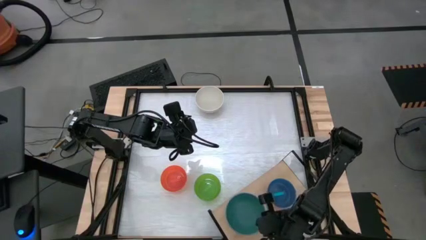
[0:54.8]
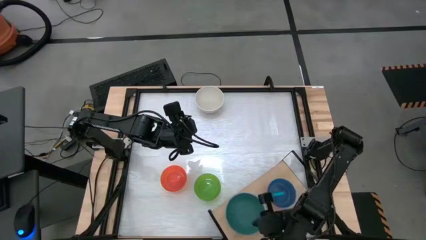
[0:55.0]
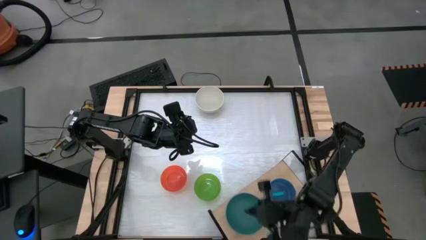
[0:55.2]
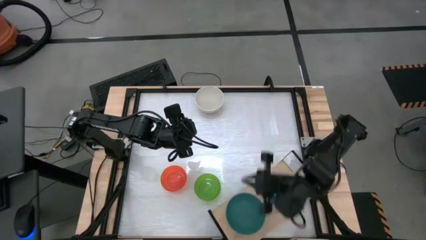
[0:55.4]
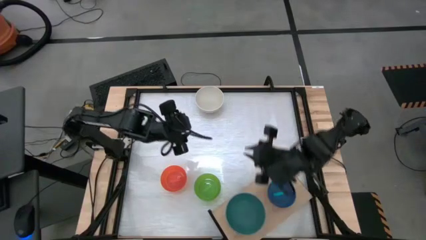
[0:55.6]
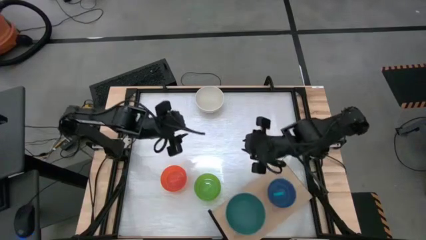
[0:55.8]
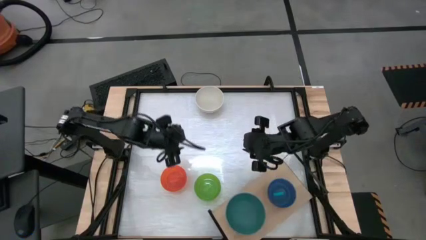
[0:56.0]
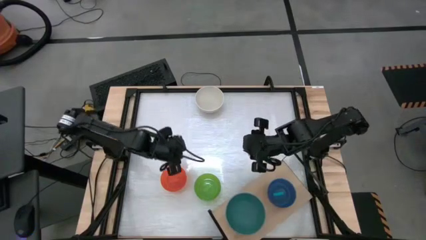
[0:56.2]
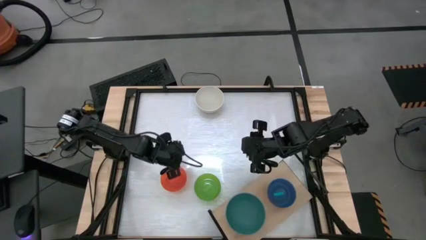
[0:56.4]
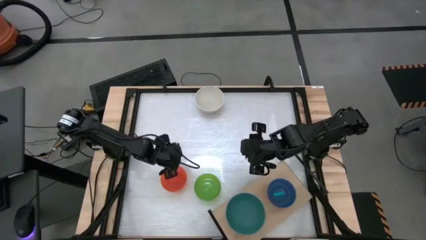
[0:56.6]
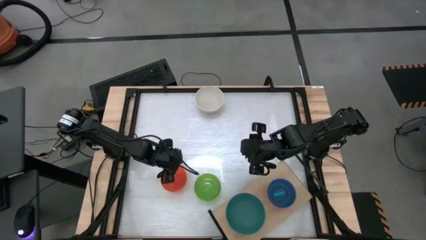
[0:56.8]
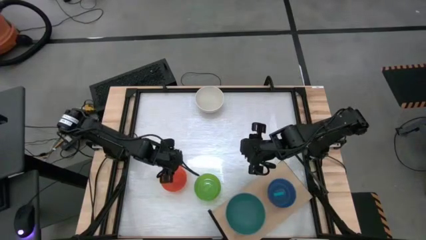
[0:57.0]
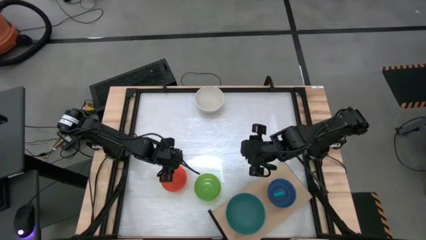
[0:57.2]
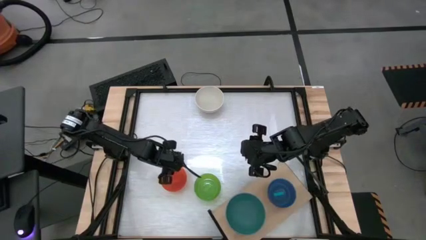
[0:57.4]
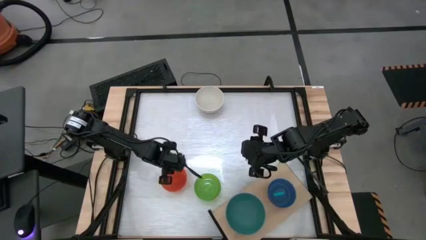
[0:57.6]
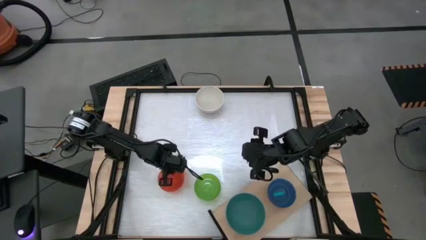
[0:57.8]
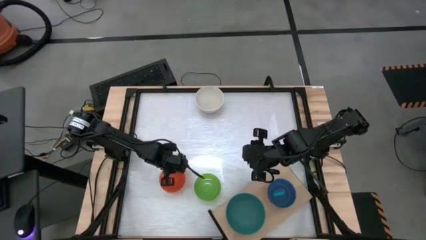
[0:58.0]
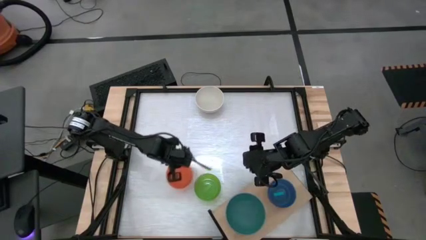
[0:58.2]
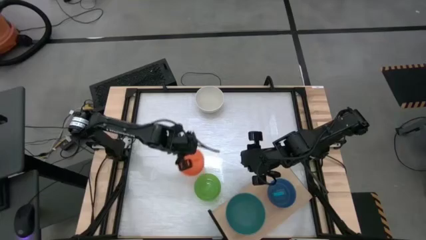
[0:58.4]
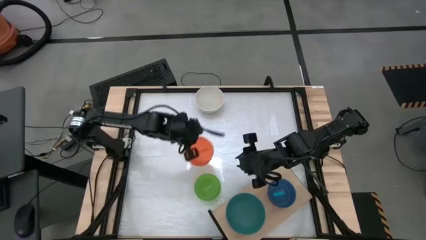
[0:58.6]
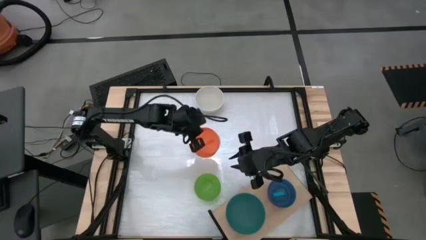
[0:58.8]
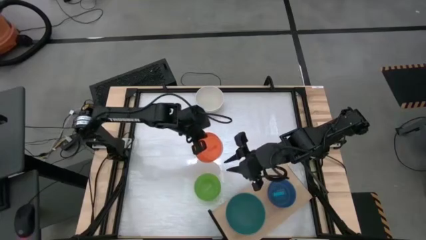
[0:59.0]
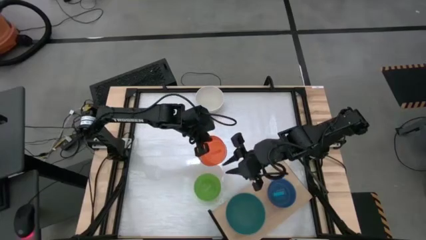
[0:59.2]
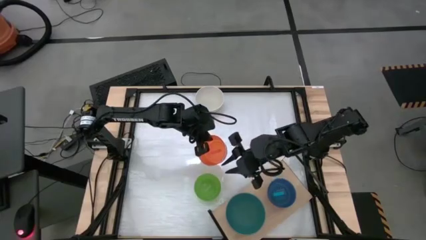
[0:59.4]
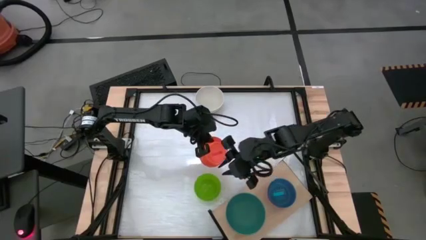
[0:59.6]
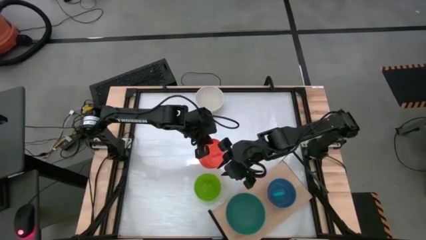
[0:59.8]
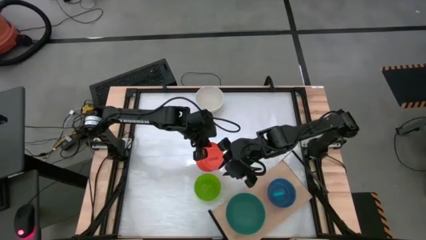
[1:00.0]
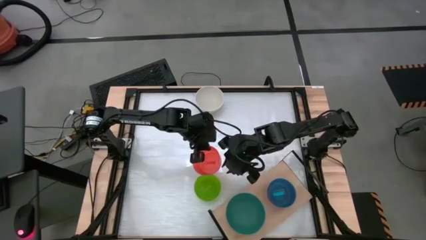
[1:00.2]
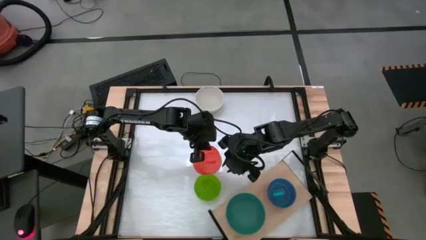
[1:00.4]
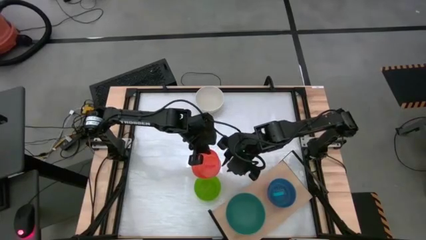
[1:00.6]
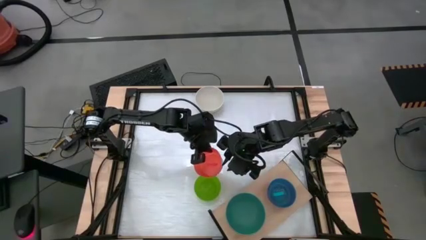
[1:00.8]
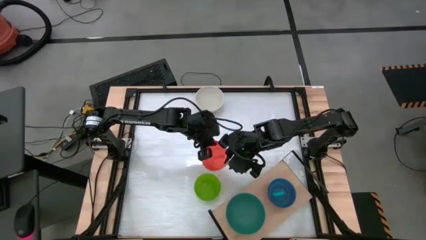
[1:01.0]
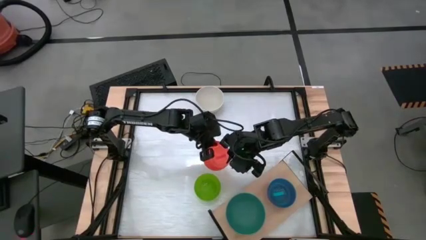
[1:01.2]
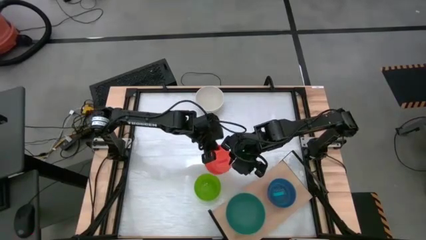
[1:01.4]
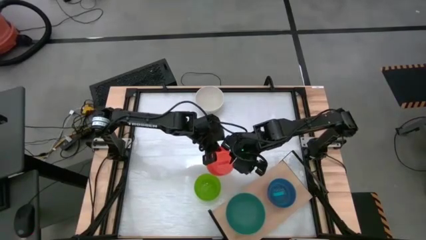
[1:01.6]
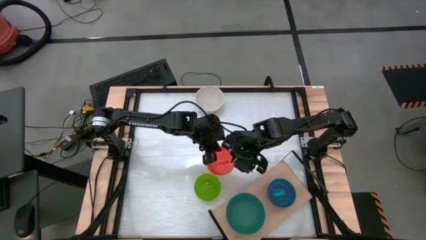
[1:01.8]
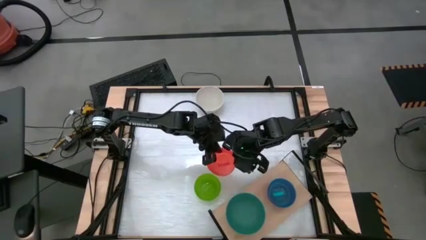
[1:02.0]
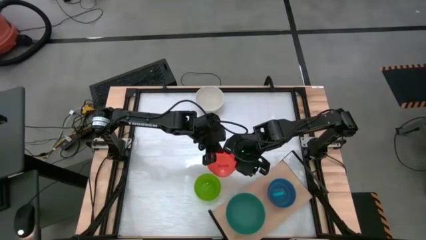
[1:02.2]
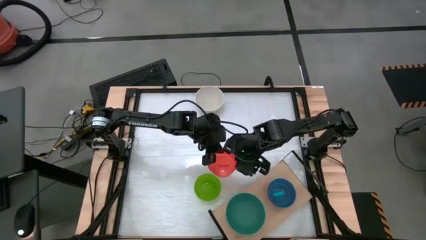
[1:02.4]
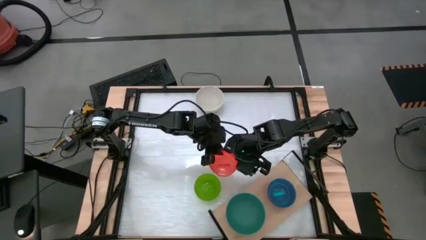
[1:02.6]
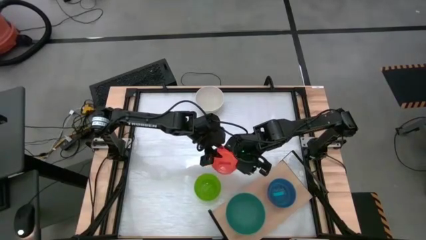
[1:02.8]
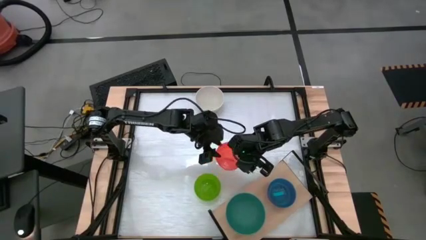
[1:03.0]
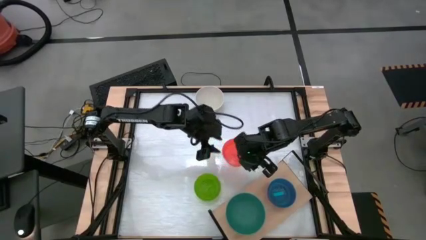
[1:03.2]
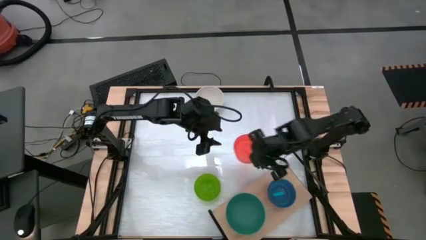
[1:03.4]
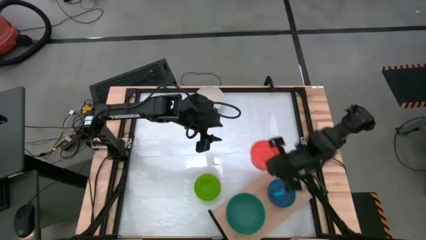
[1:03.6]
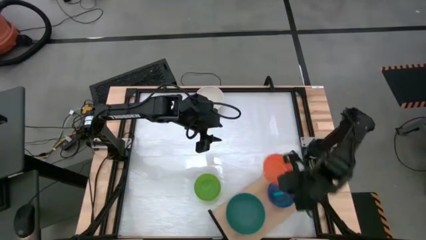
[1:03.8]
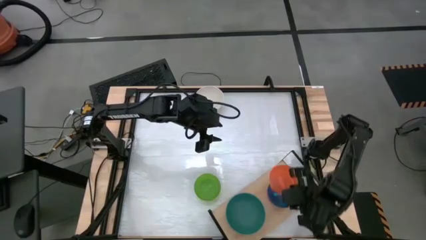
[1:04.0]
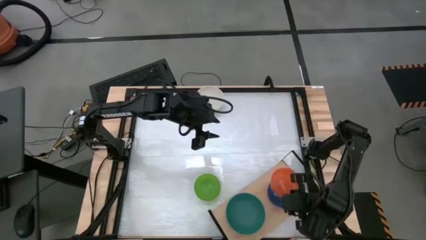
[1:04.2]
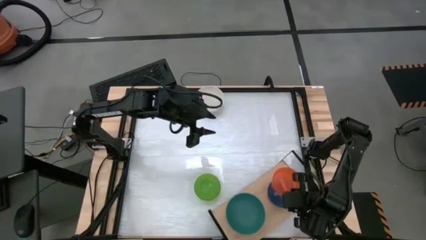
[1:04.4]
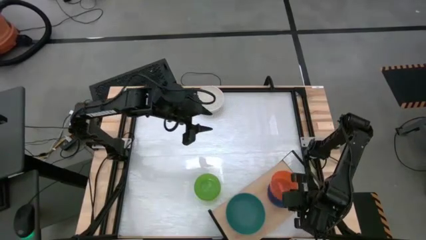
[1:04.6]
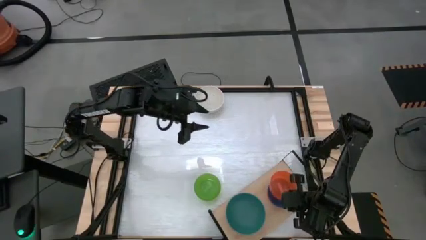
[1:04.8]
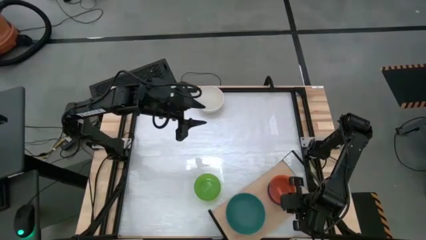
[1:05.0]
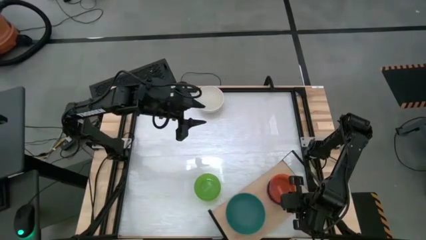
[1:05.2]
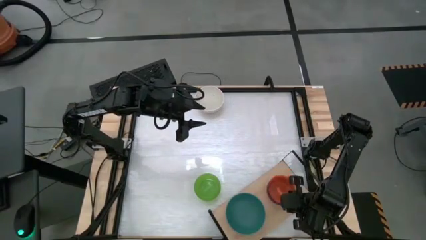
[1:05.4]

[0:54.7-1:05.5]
Task: Place and stack bowls onto a shelf
Stack the orange bowl on top of the blue bowl on the shelf

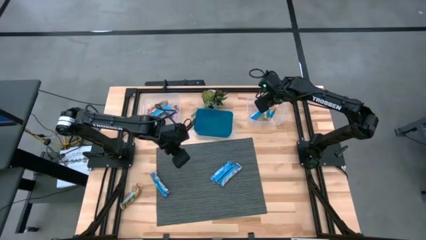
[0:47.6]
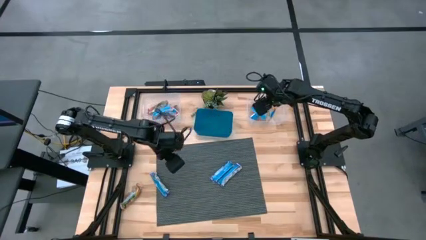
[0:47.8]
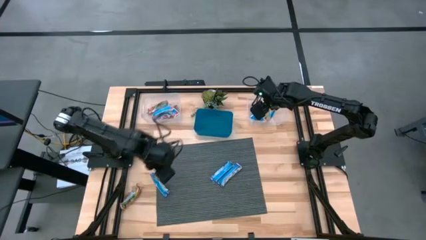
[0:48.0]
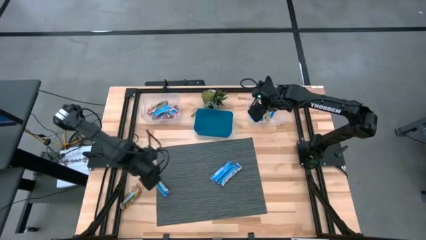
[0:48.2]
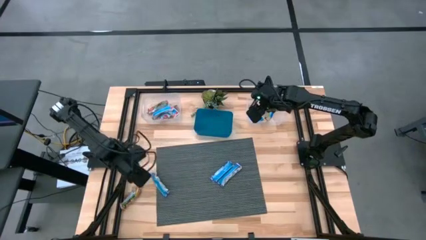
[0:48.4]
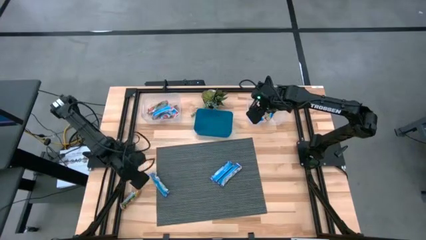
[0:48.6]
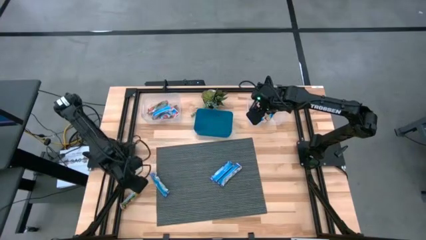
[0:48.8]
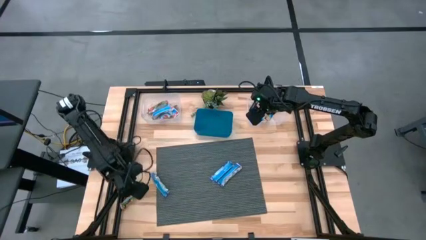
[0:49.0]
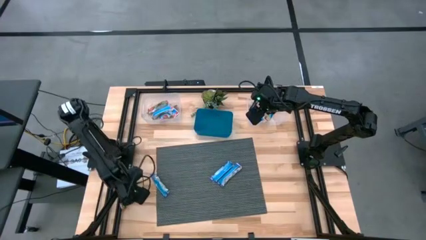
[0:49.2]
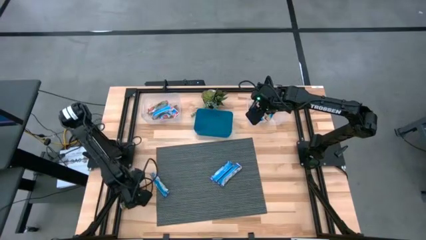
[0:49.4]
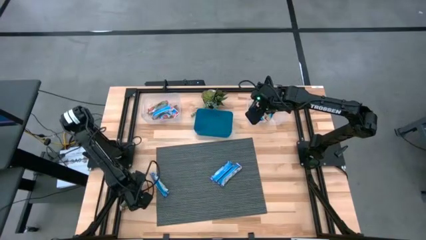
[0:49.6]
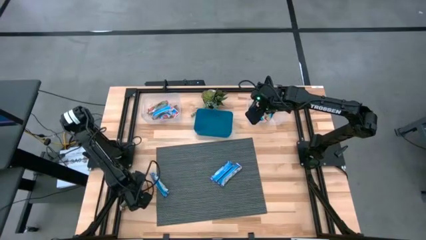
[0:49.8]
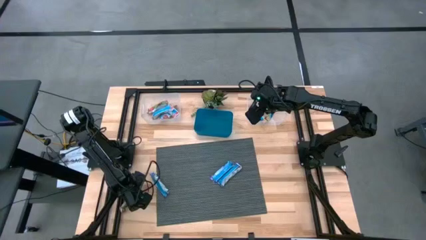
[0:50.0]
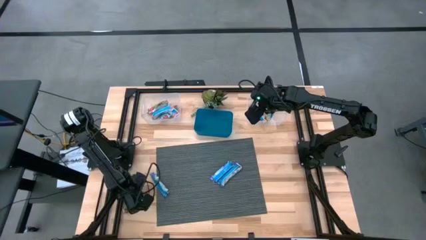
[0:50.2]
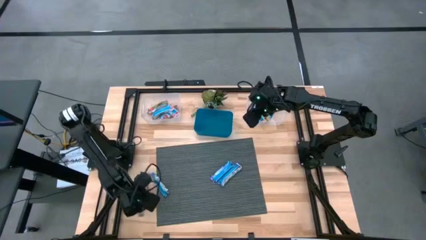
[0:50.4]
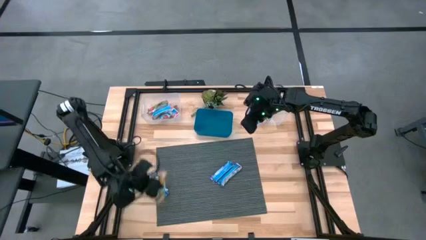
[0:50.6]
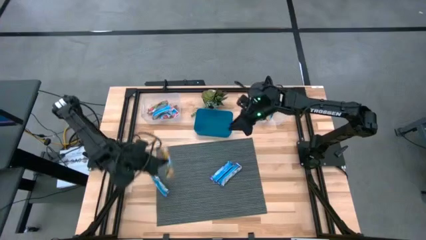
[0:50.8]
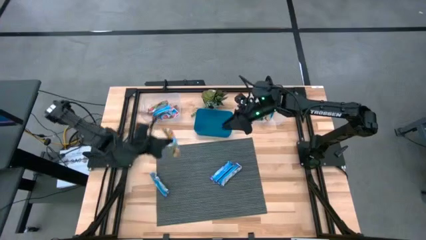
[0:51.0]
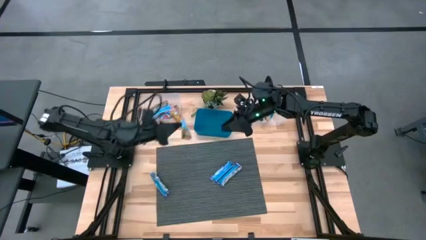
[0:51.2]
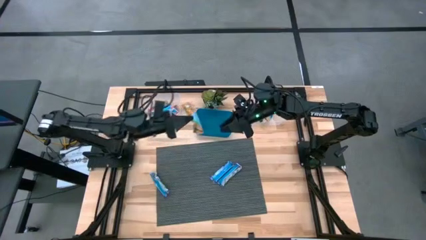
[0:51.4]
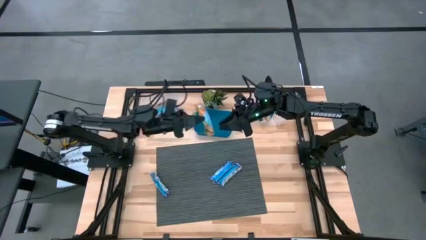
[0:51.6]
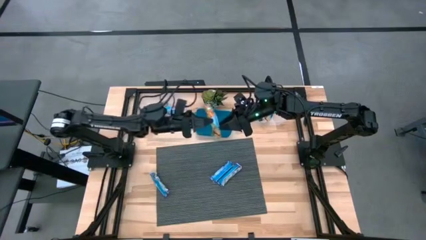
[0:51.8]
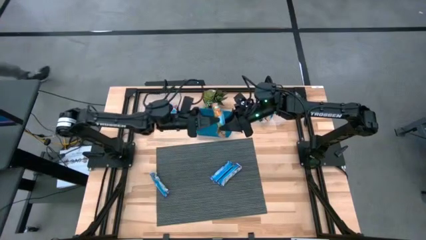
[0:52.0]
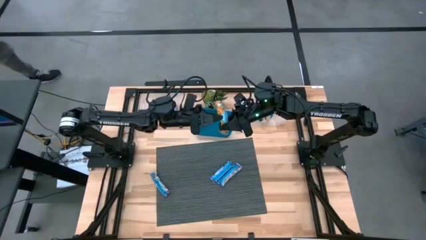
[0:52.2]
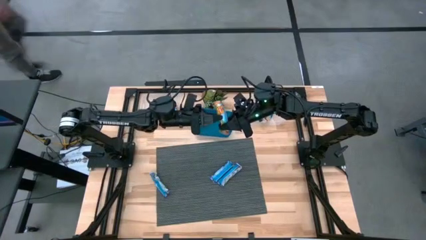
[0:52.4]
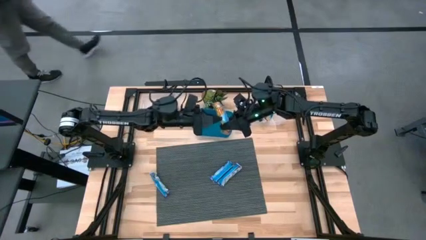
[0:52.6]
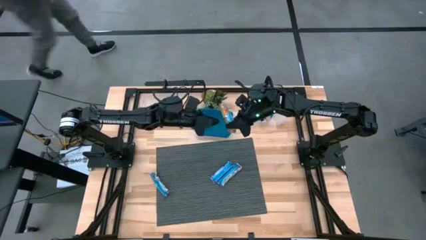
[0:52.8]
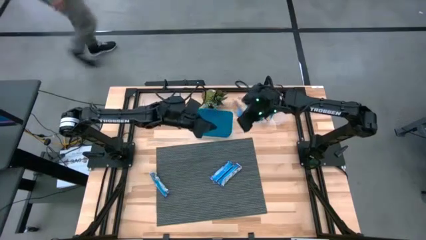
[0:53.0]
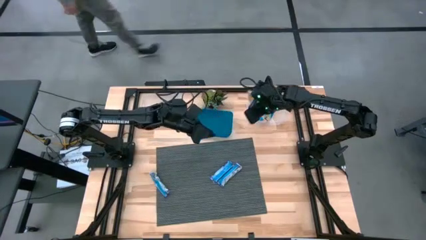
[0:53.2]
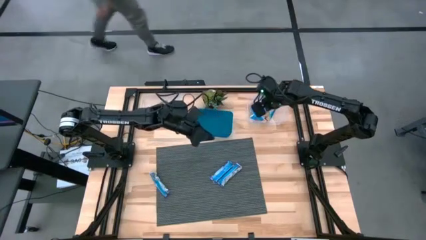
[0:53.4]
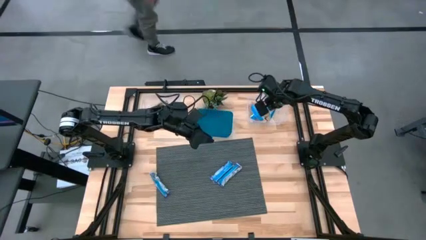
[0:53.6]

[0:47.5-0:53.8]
Task: Pick and place Granola Bars by type
Put the yellow granola bar into the right transparent bin
